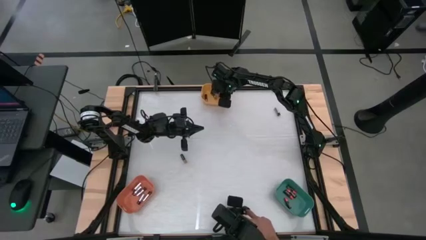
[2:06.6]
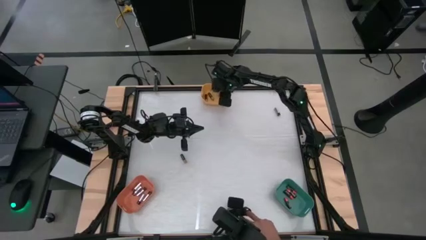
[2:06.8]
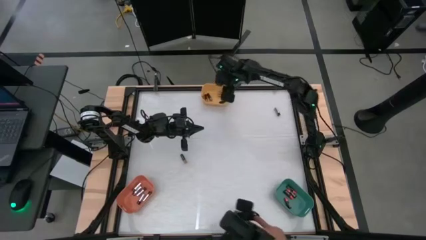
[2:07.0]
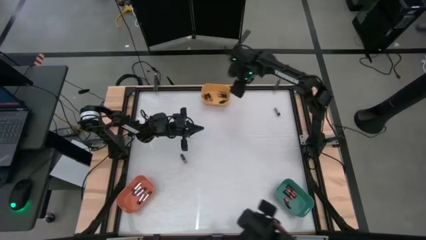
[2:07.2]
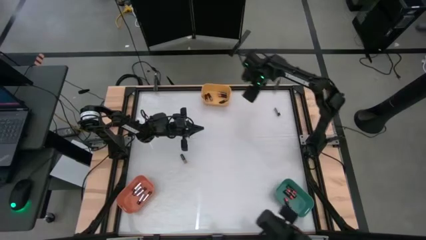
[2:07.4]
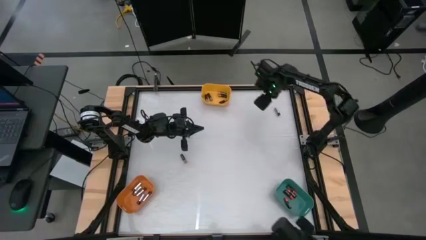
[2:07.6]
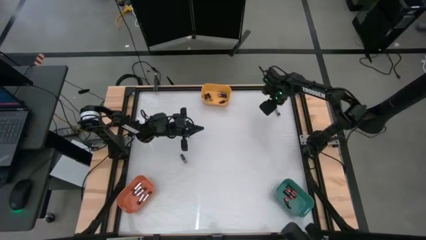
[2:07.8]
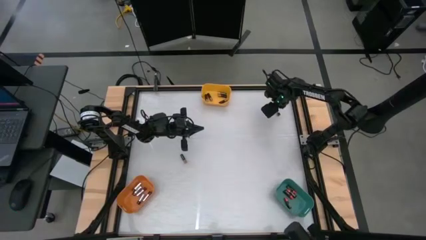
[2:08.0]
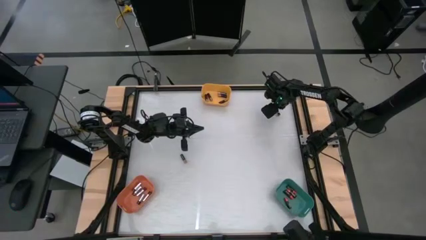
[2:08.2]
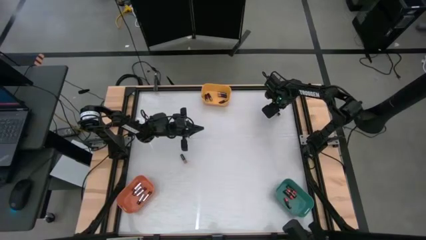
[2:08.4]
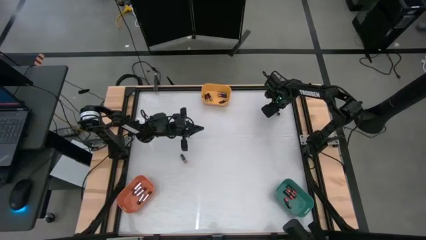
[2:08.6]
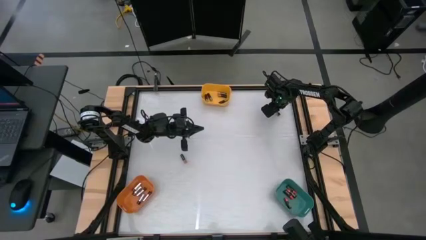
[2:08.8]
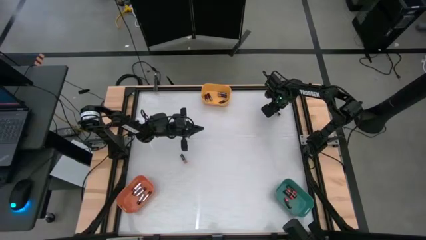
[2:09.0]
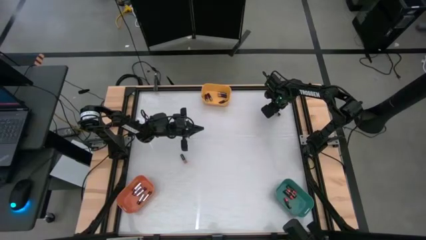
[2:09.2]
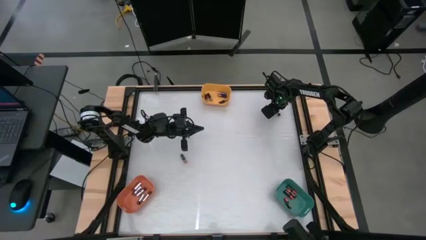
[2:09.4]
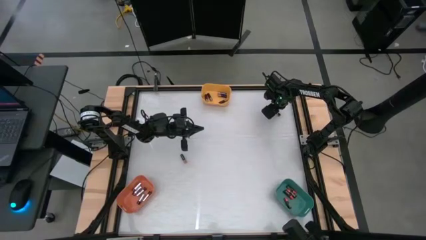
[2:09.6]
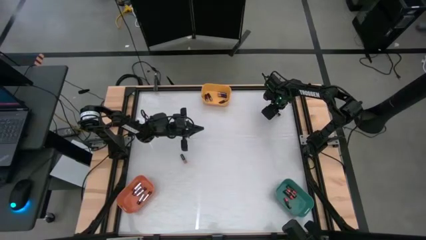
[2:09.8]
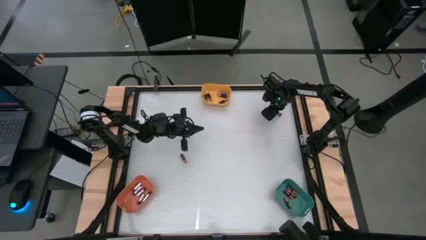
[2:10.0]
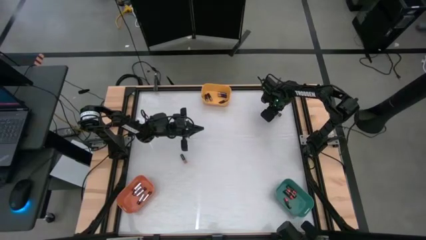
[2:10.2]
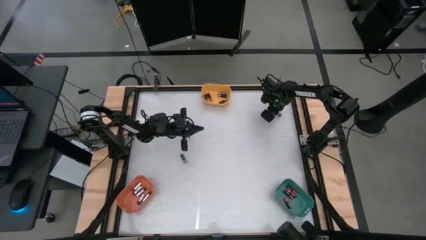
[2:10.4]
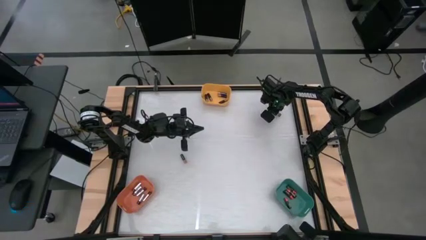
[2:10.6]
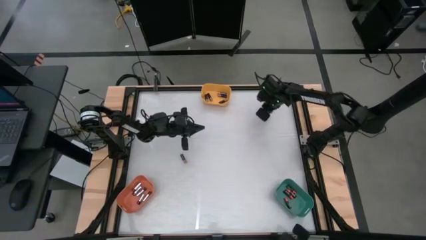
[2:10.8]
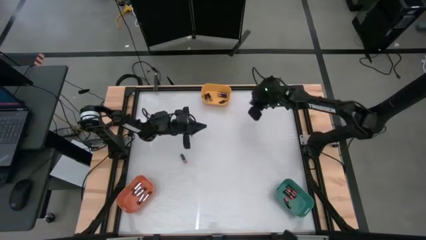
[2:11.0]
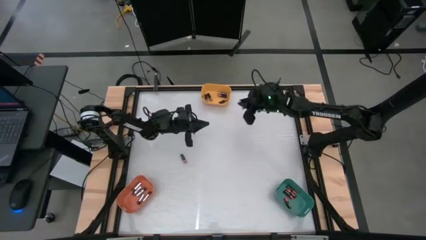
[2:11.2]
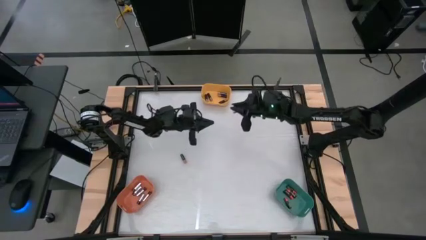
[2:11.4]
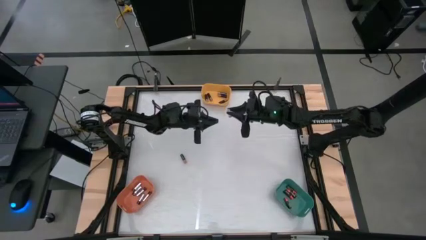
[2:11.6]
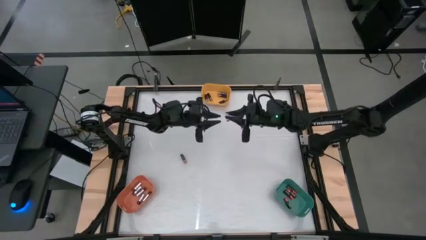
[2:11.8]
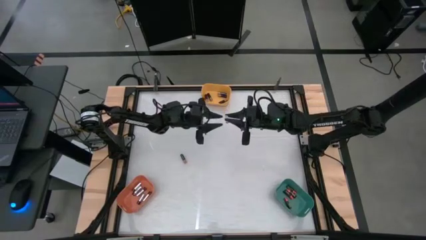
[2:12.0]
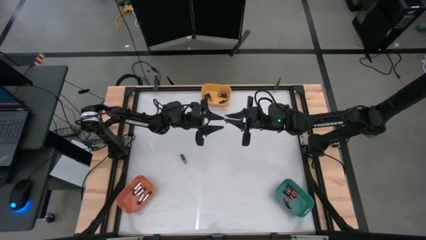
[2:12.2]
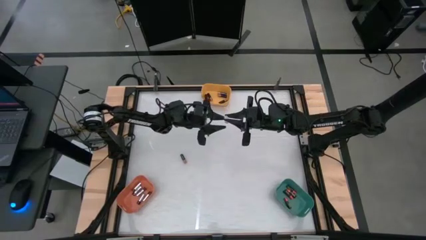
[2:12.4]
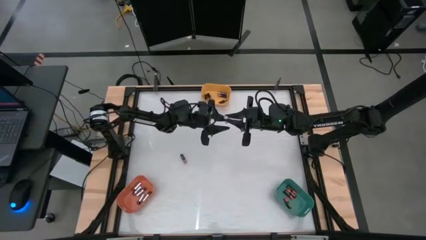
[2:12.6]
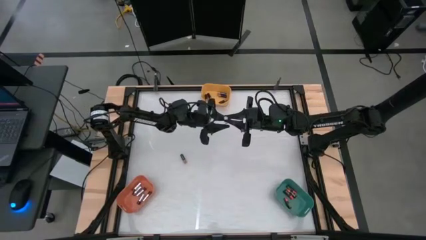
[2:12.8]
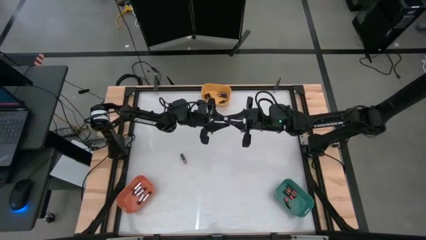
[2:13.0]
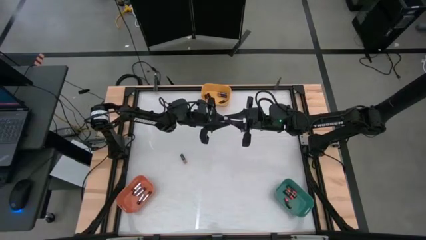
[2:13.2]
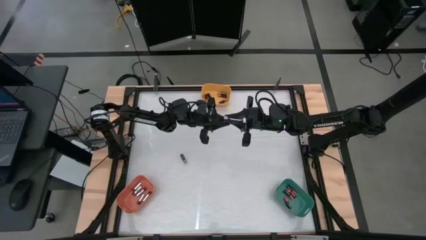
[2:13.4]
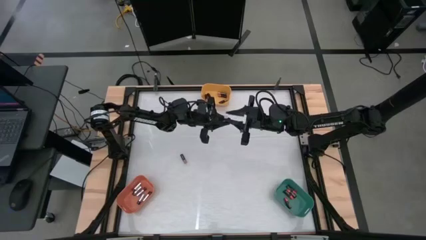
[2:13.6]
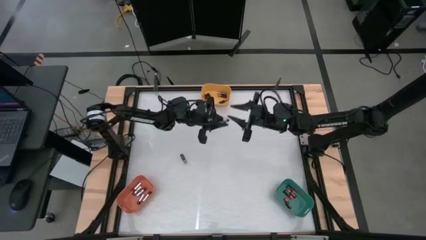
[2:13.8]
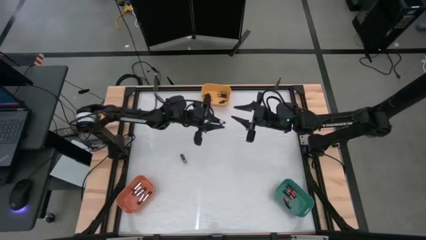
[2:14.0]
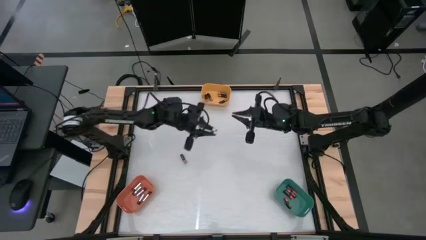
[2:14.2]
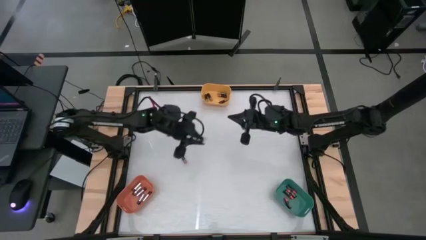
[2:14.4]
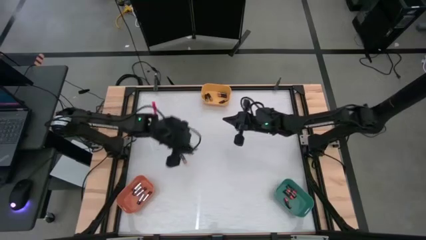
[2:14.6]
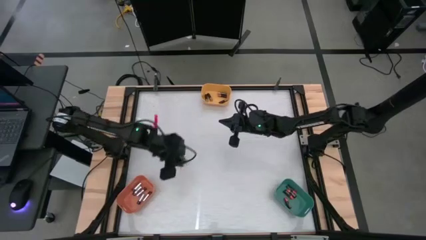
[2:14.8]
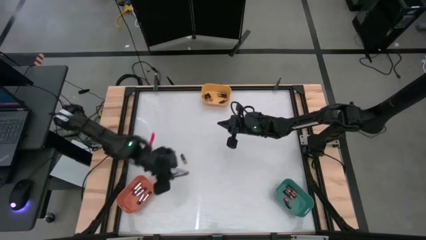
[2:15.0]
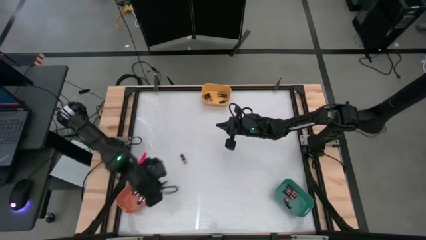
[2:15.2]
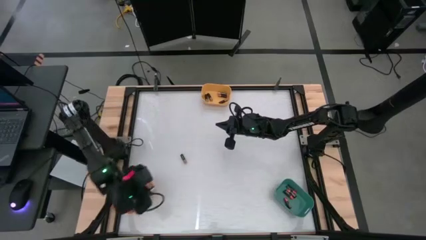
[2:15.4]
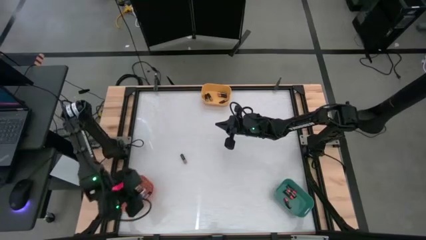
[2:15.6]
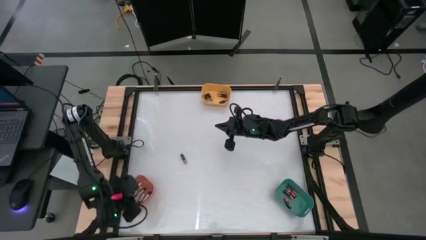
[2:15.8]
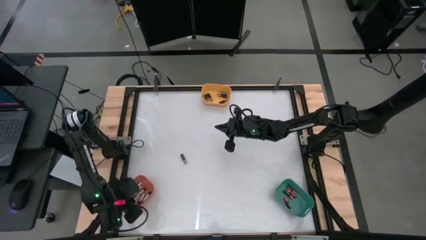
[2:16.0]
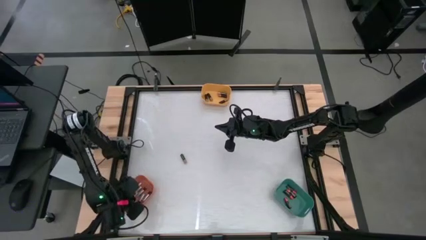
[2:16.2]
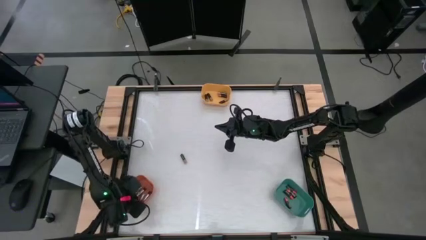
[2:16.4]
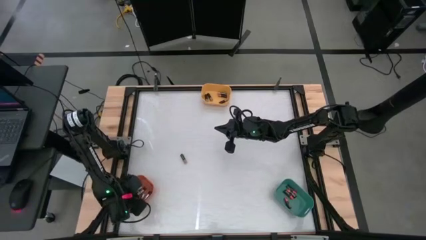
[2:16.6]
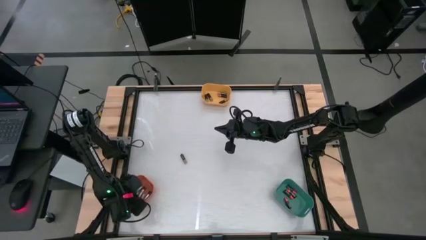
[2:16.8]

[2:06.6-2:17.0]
Task: Sort batteries
Put the silver battery into the orange bin

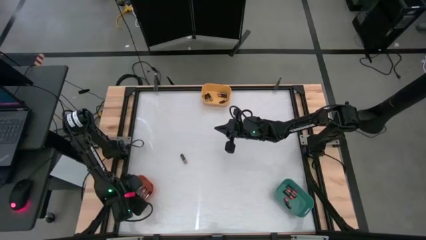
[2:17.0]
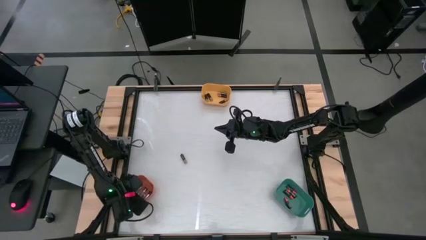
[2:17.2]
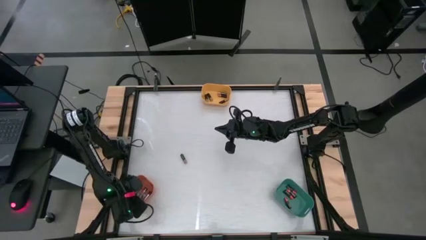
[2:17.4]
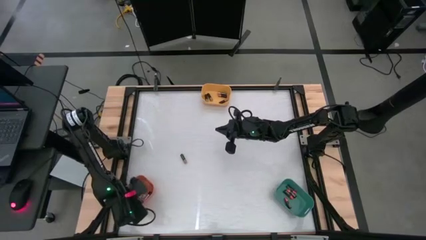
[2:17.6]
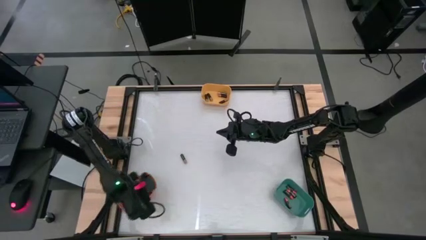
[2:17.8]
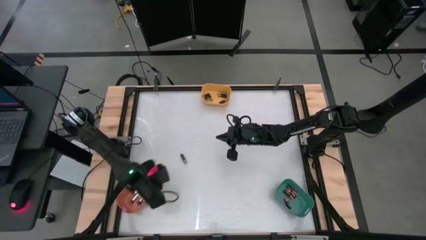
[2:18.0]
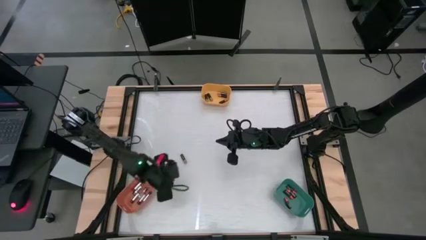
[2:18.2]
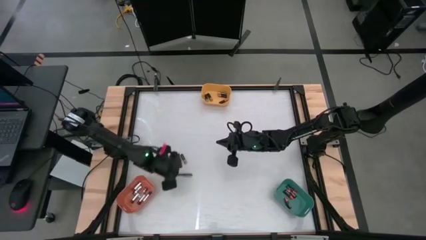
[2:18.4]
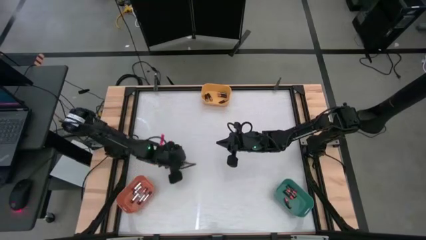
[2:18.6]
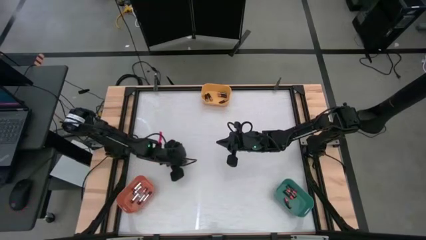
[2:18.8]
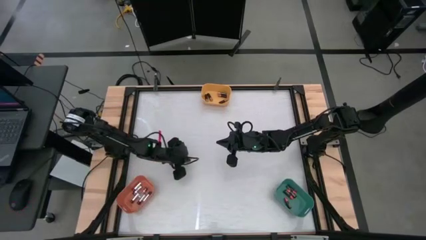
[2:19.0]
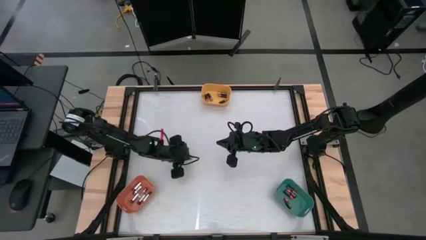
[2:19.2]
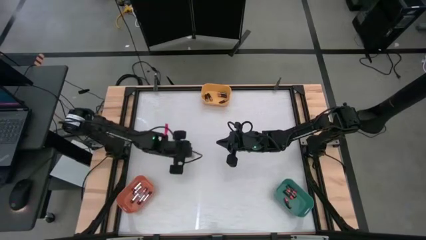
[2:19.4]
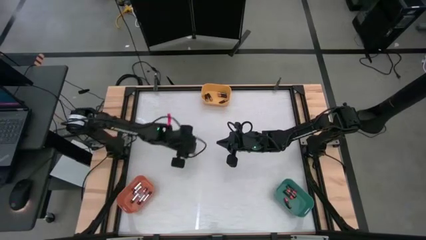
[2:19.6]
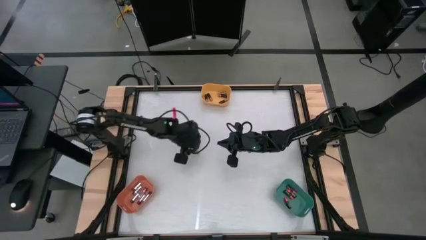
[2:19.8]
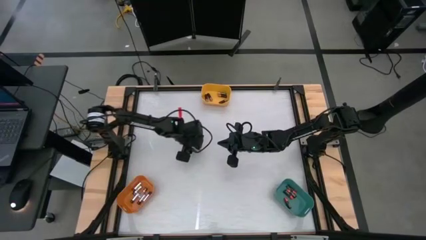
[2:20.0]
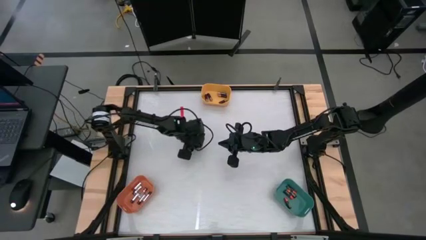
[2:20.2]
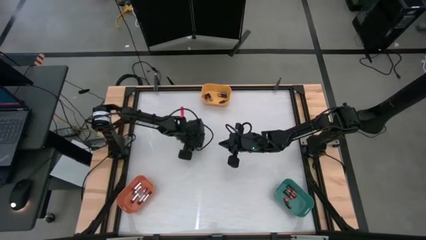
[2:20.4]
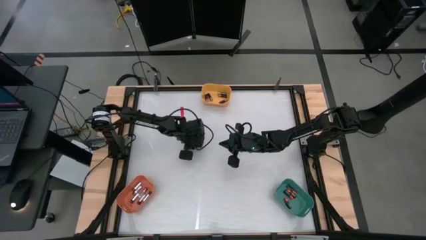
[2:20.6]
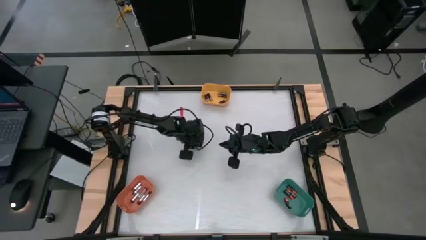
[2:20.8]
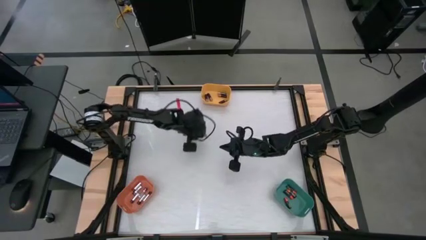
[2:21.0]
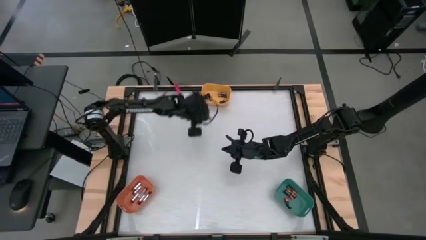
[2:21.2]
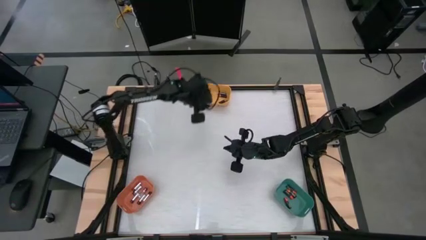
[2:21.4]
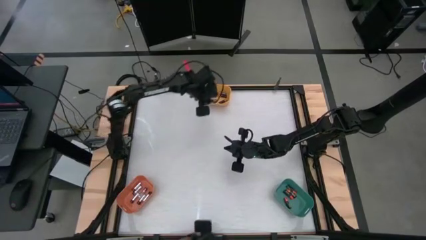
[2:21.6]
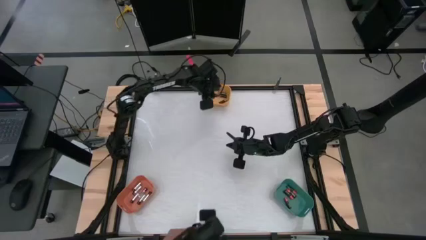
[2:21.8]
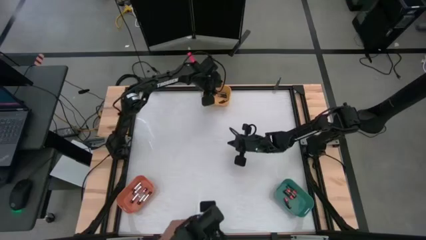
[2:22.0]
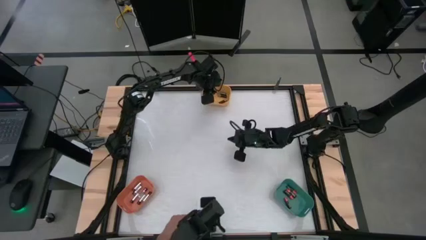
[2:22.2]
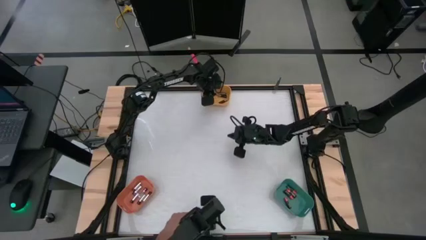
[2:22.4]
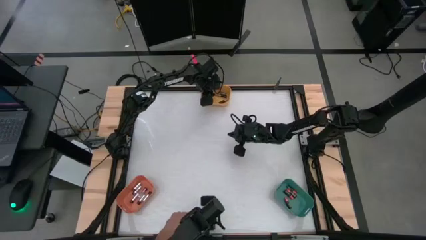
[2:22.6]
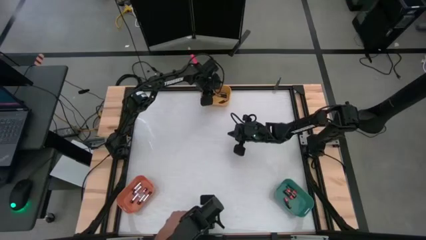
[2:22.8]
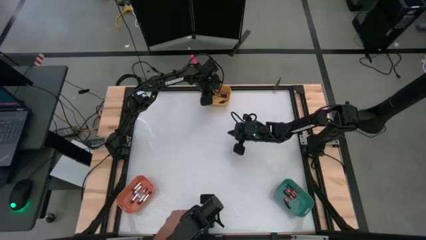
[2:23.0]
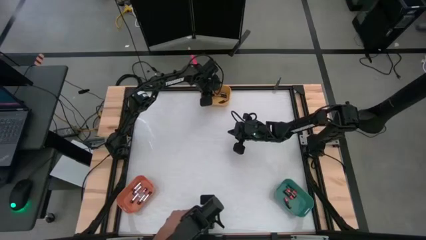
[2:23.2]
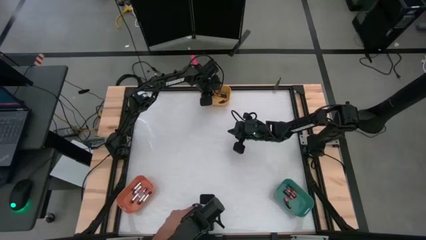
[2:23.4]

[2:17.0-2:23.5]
Put the black battery into the yellow bin
